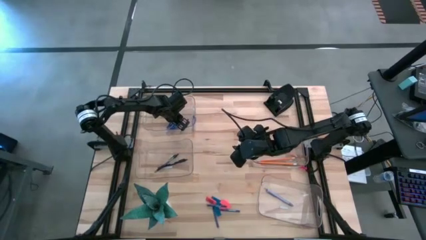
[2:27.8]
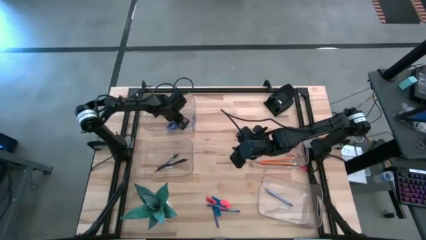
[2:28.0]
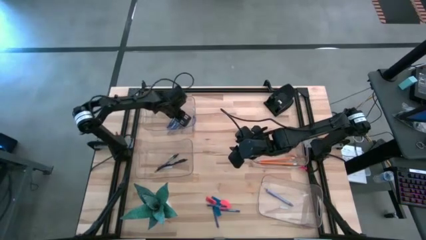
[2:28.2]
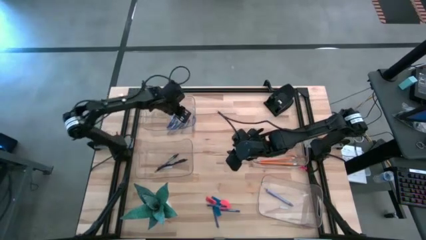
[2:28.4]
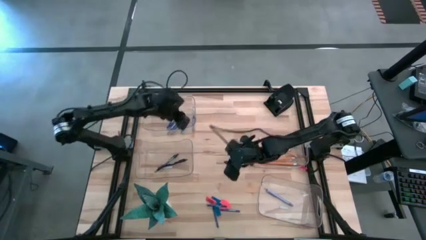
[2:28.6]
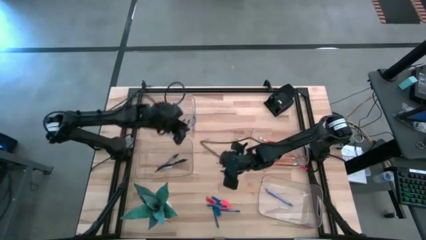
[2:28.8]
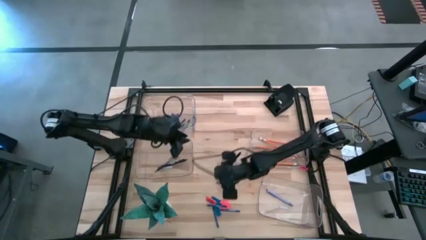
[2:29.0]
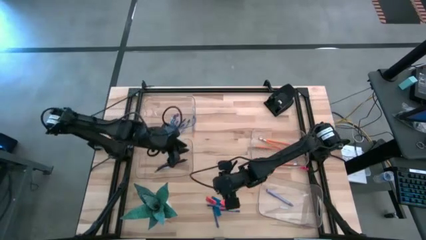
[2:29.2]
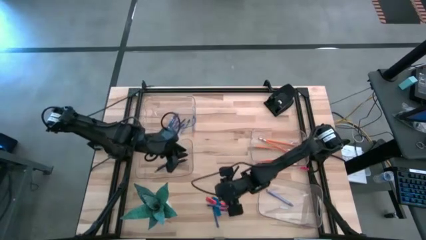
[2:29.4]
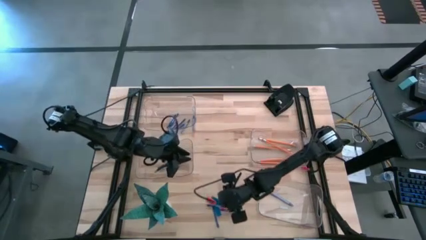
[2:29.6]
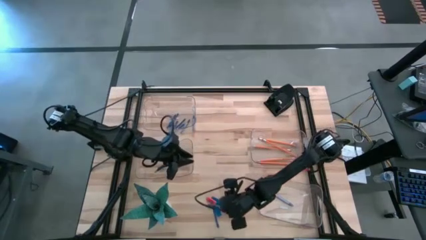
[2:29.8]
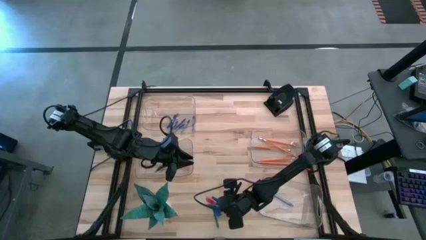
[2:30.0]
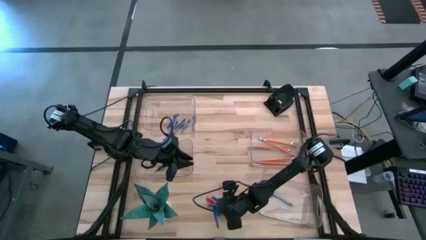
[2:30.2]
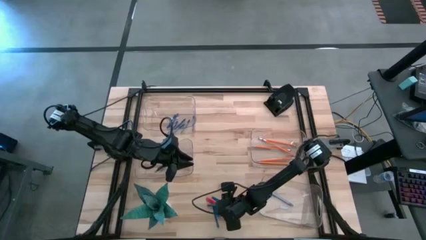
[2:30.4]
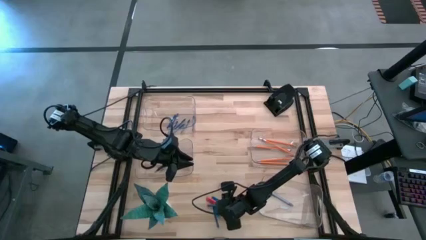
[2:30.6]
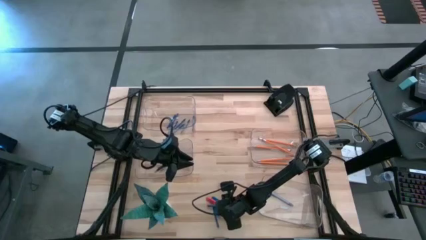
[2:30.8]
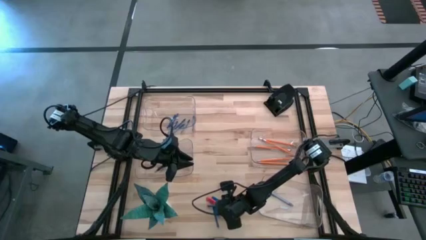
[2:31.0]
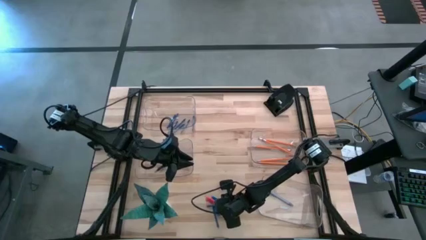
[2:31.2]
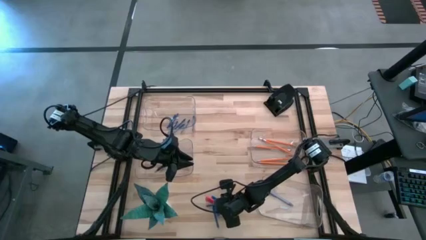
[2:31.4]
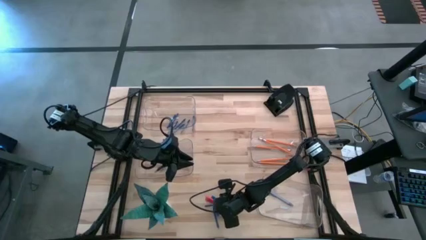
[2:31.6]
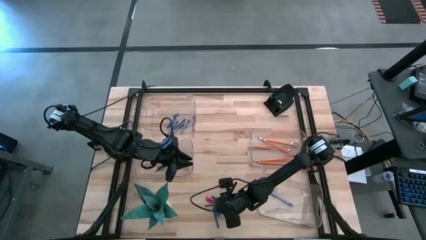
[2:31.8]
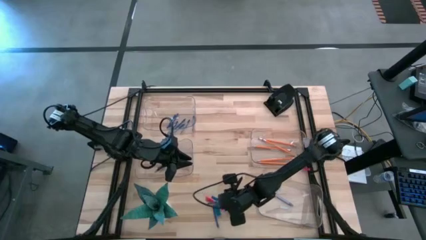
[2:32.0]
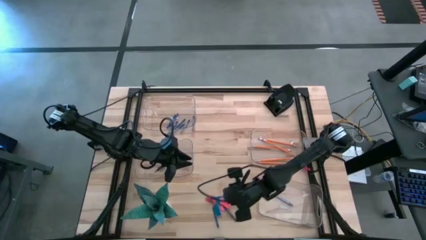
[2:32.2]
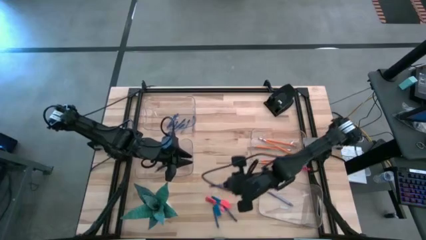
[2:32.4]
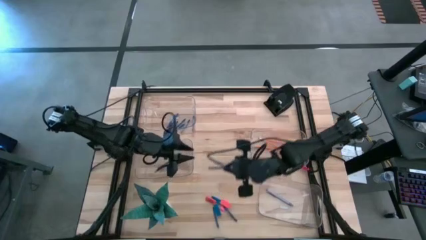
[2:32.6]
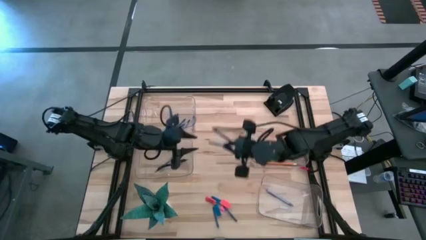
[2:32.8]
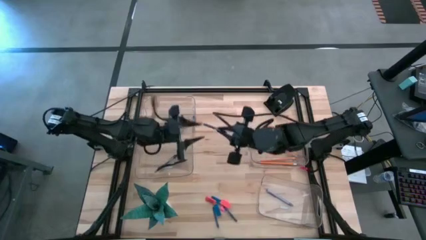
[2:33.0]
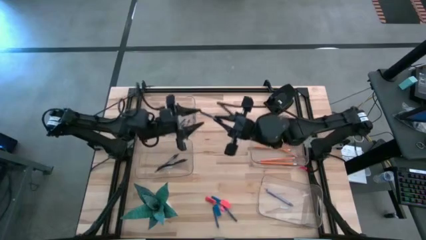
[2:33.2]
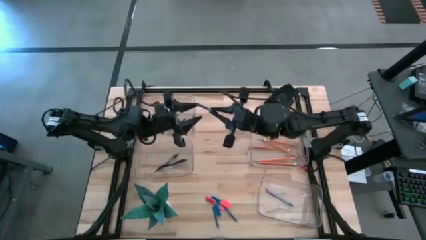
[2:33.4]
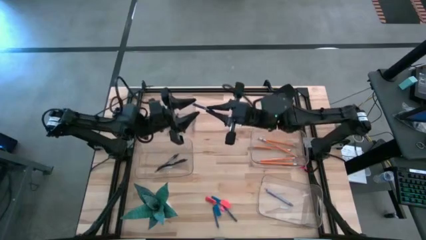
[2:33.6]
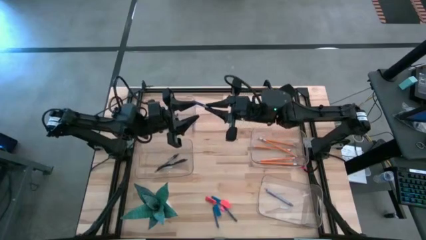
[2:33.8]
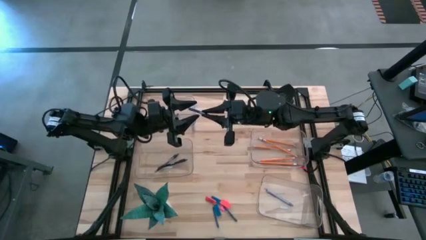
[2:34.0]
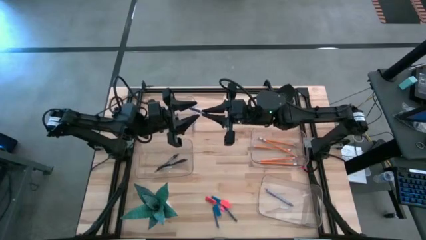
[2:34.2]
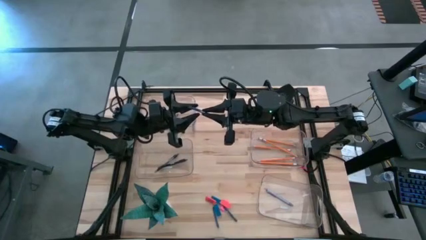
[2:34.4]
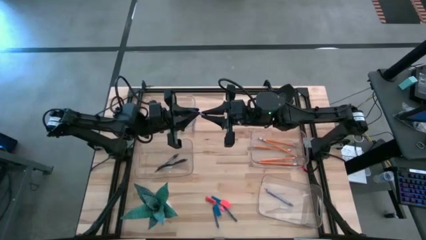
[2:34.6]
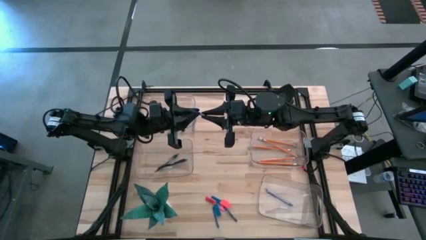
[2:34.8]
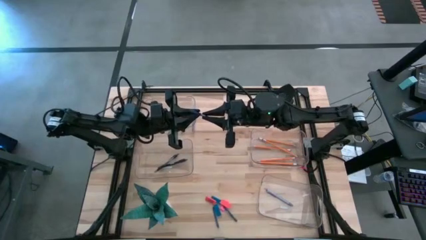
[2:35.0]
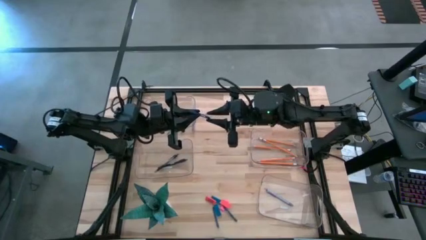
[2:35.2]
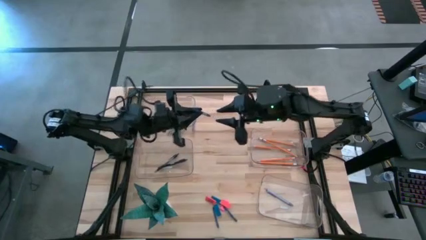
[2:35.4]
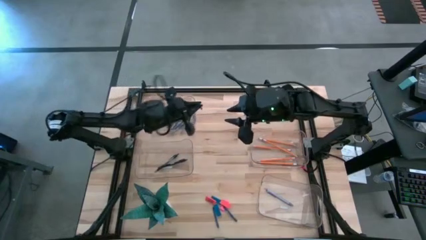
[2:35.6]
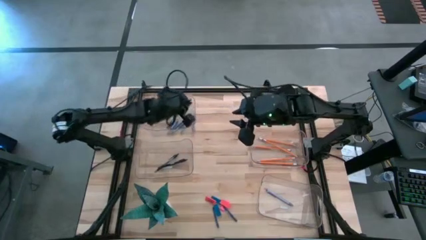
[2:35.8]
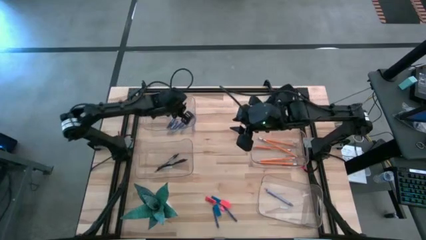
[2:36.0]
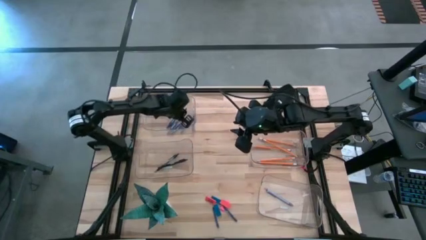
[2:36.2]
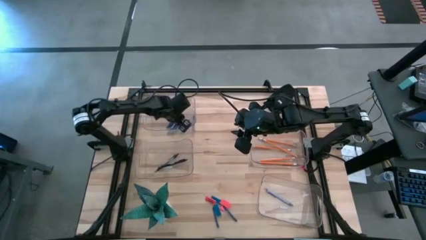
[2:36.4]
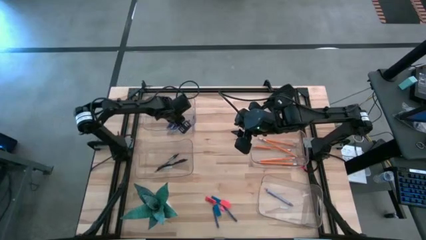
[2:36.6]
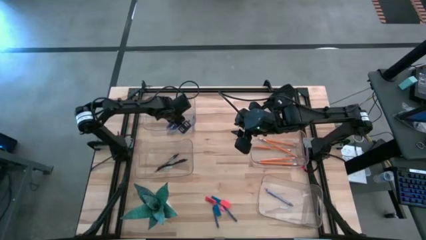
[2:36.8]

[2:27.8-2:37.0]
Task: Sort crayons/erasers/pens/pencils in bins
Put the blue crayon into the top transparent bin

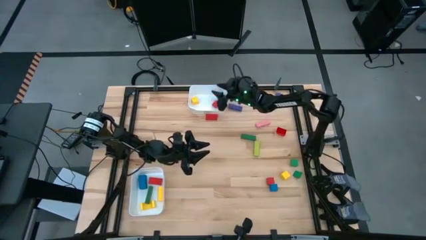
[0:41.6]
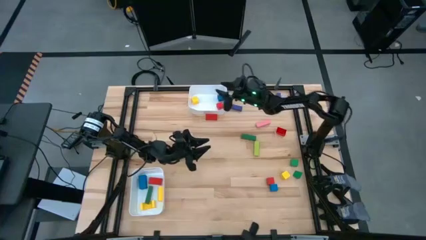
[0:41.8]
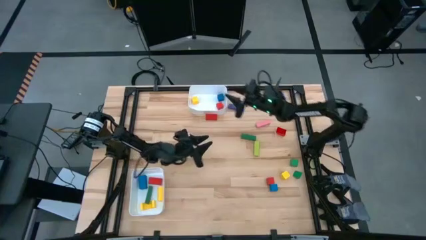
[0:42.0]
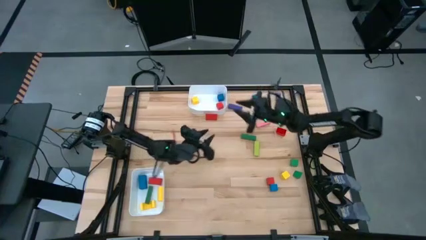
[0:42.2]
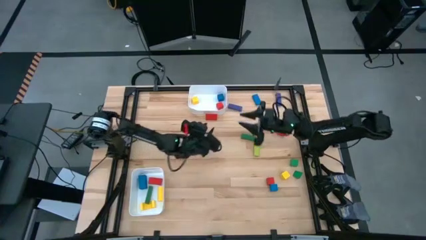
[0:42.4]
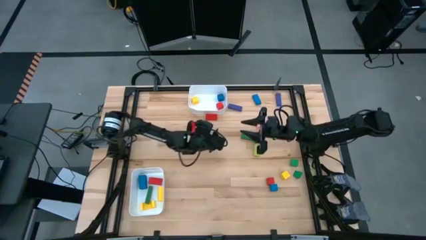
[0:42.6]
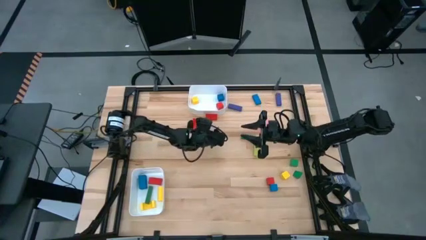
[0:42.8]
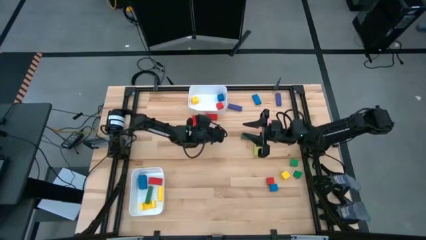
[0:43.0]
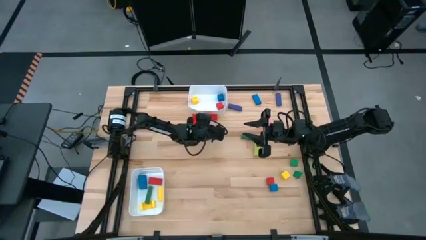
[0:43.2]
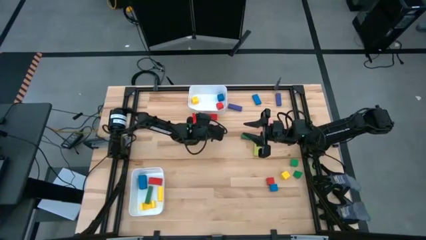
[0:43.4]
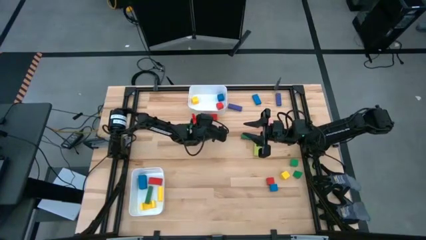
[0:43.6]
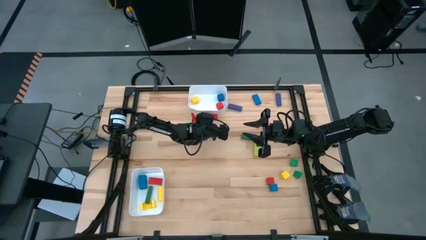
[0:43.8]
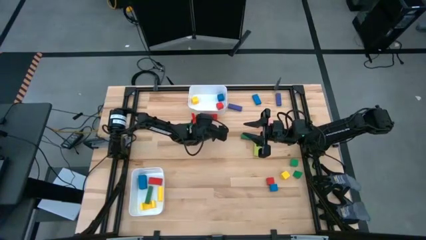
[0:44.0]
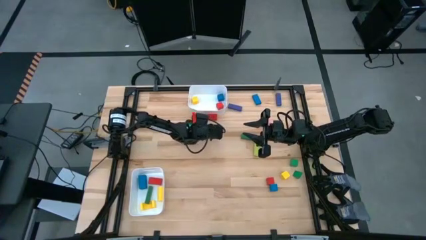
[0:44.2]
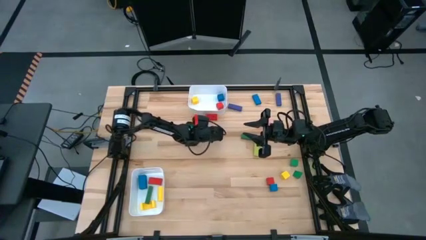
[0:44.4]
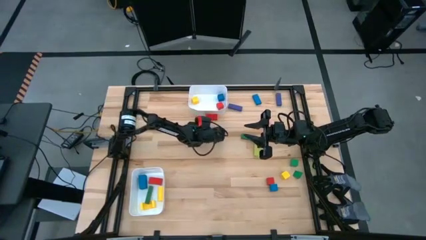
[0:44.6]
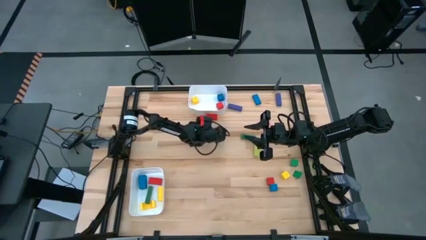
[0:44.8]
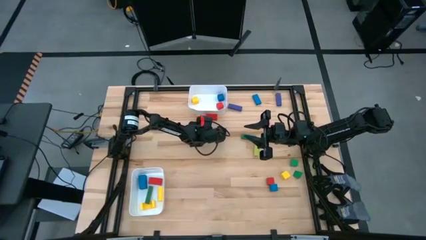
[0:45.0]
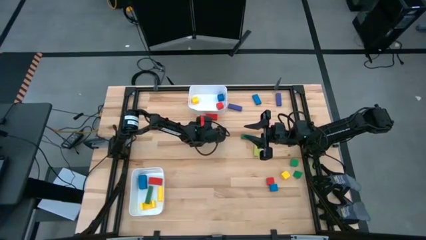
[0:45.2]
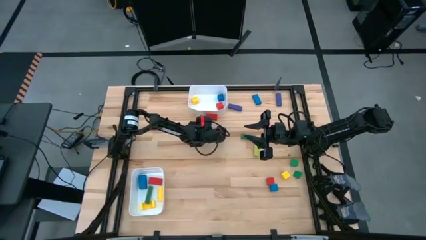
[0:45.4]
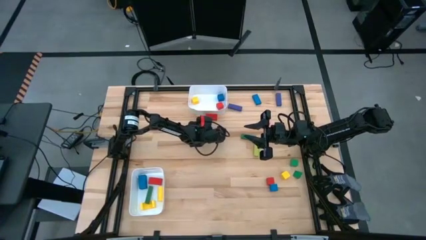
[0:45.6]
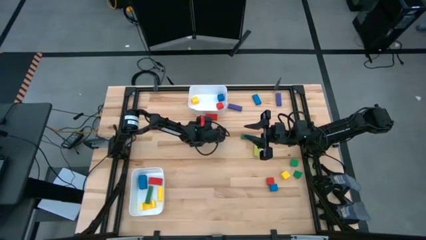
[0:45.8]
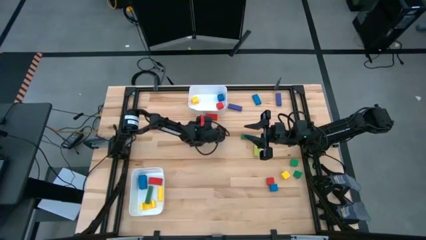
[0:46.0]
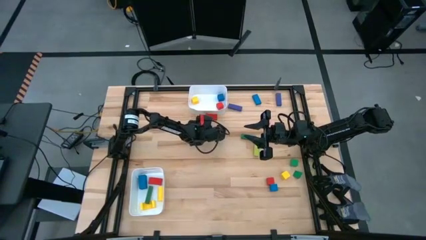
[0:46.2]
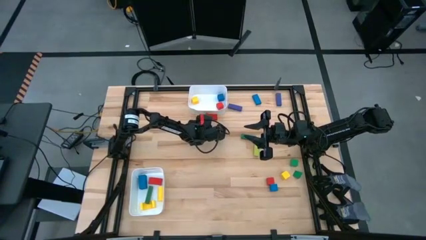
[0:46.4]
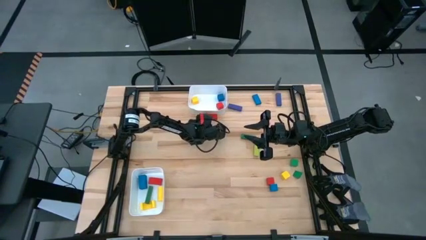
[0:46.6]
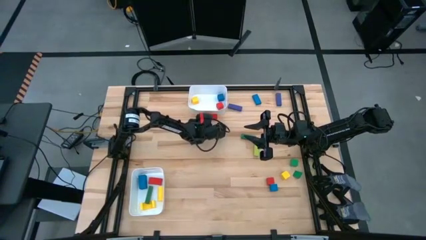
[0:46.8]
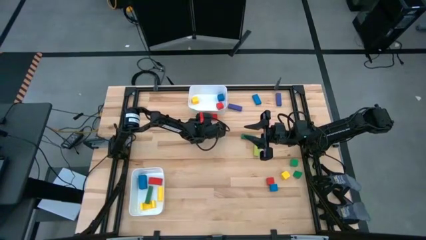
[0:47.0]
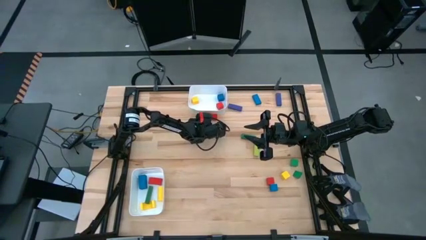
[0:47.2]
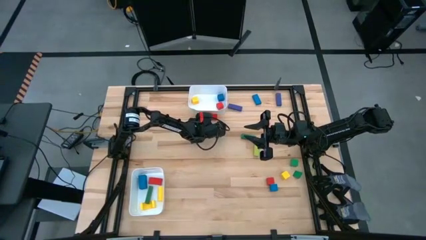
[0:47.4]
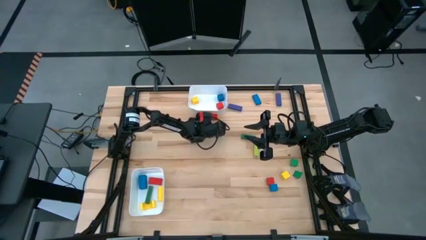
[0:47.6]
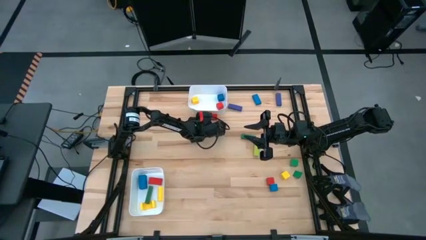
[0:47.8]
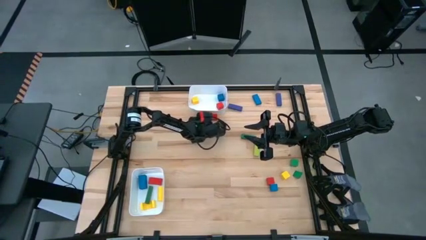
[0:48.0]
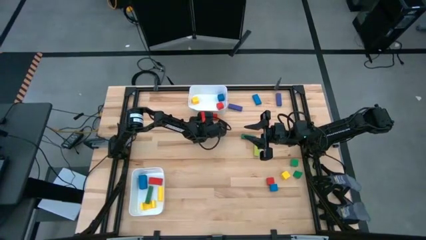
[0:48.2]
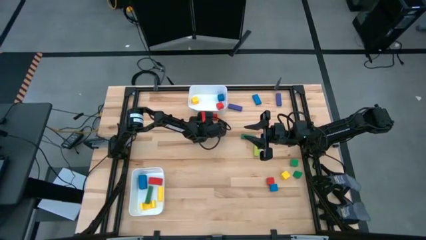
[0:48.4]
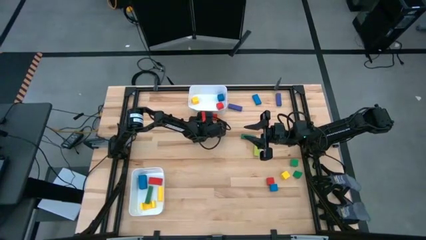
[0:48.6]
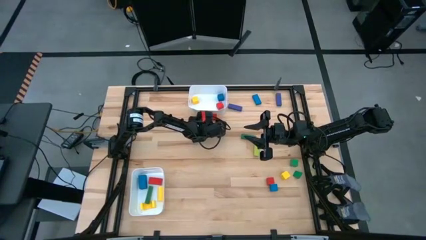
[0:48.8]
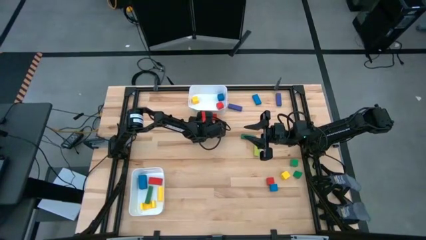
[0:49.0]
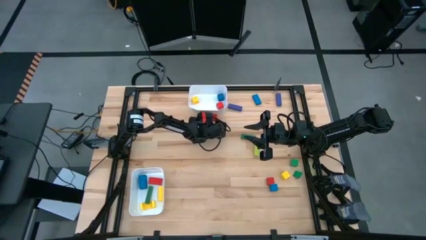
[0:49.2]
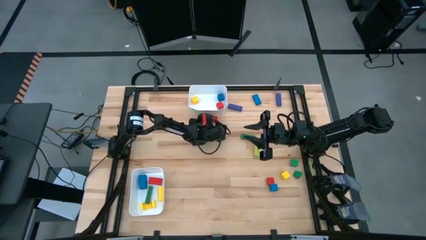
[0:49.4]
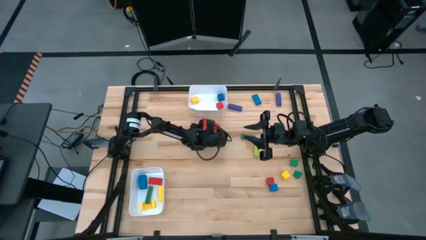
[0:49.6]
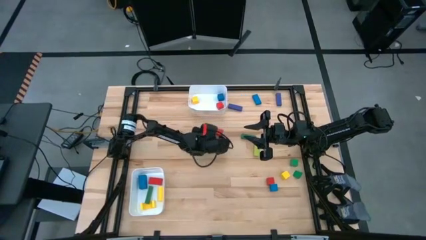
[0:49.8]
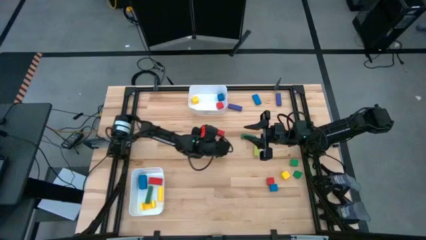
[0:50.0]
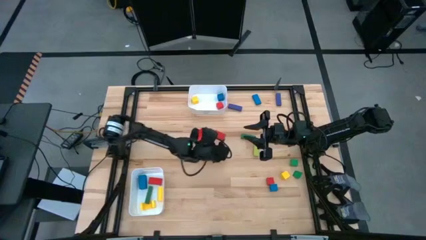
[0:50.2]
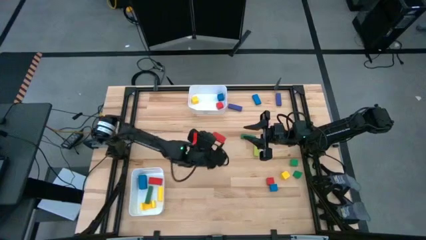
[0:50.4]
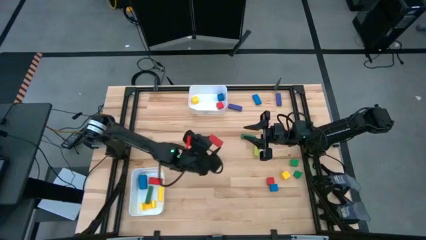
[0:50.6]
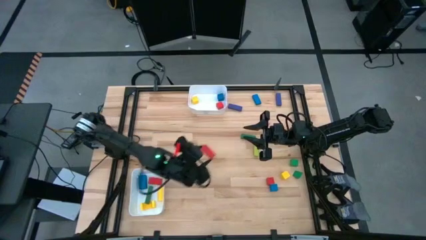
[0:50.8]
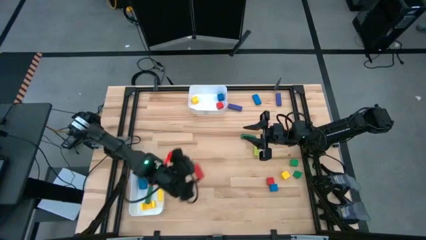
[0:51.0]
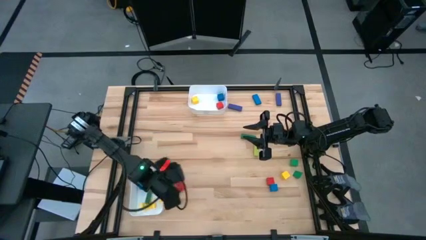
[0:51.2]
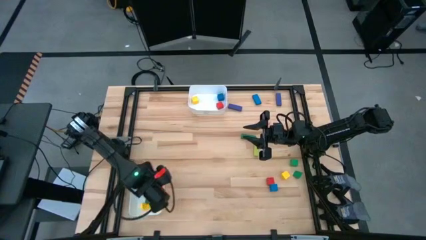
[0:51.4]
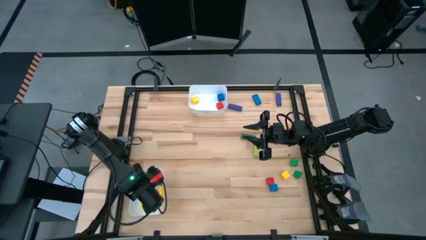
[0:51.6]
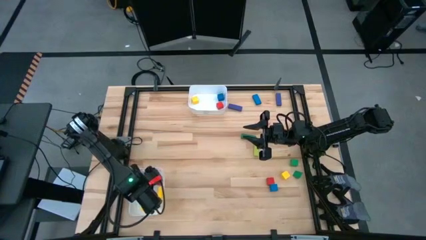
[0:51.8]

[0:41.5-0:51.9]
Task: Sort blocks by size
Put the red rectangular block into the bottom white bin
